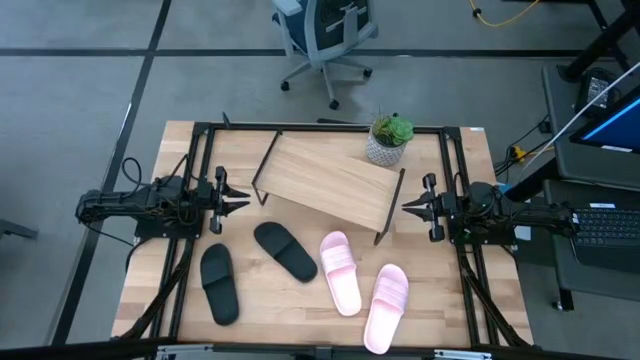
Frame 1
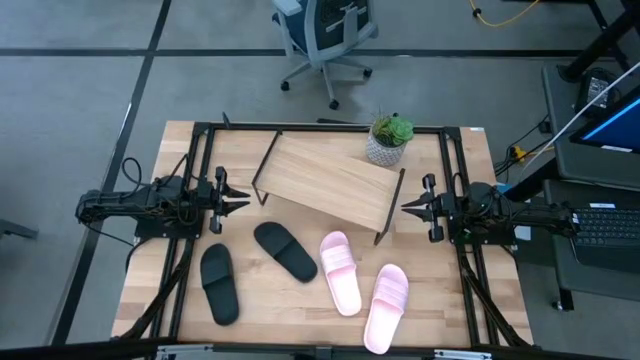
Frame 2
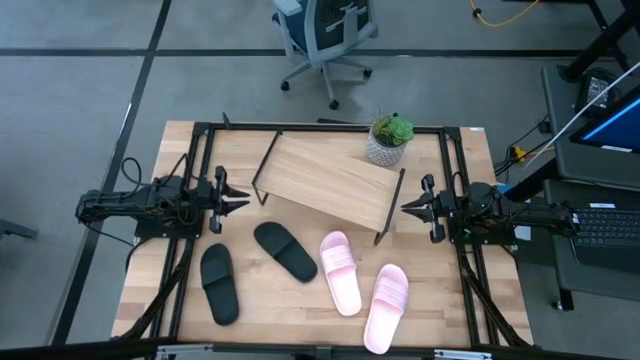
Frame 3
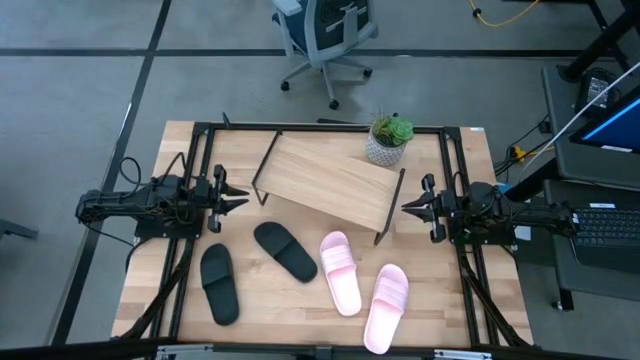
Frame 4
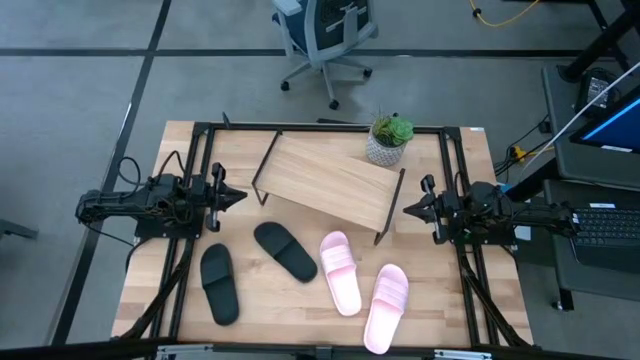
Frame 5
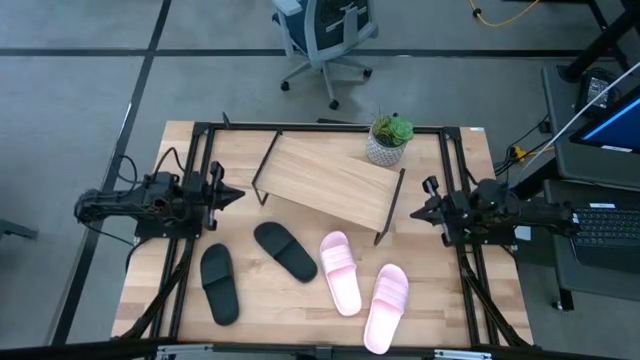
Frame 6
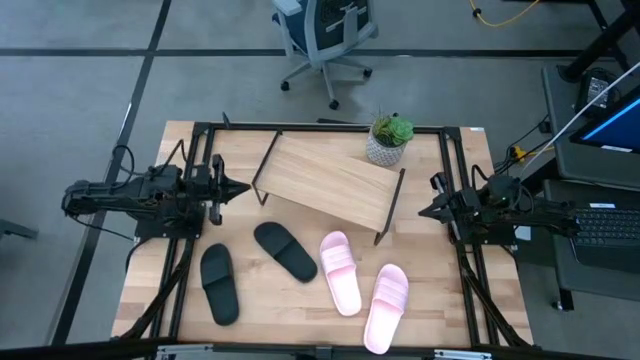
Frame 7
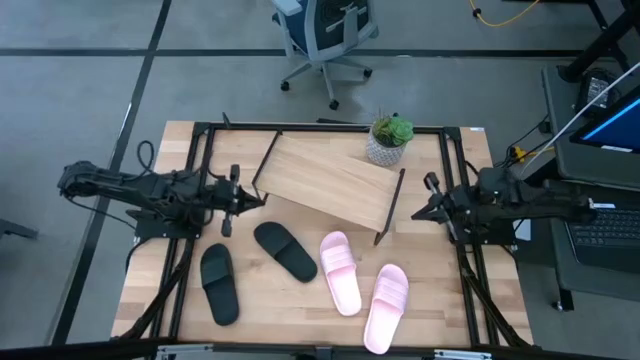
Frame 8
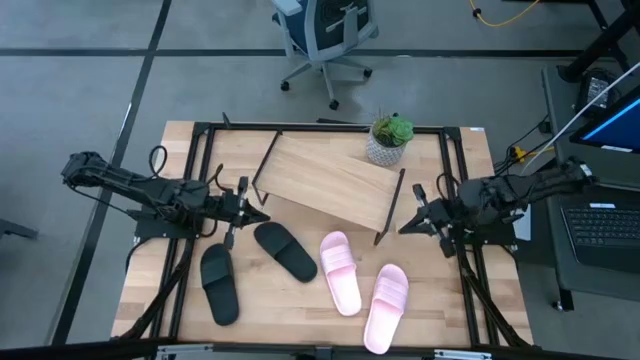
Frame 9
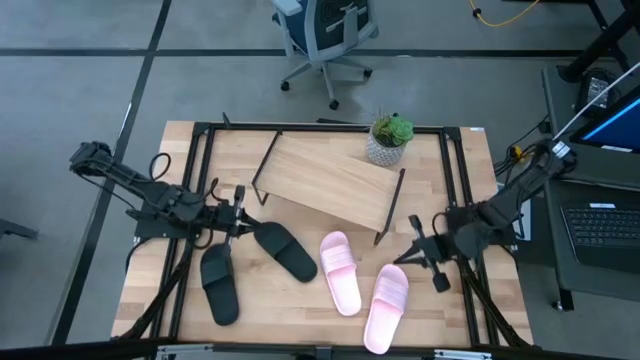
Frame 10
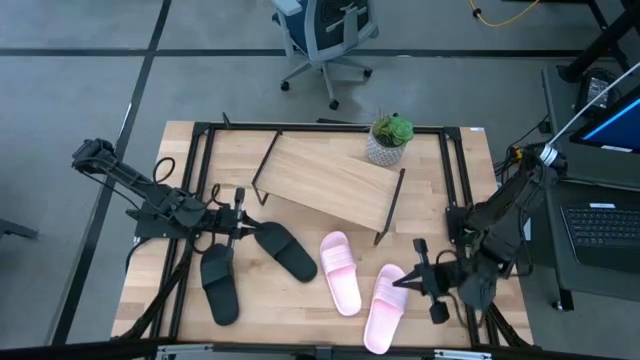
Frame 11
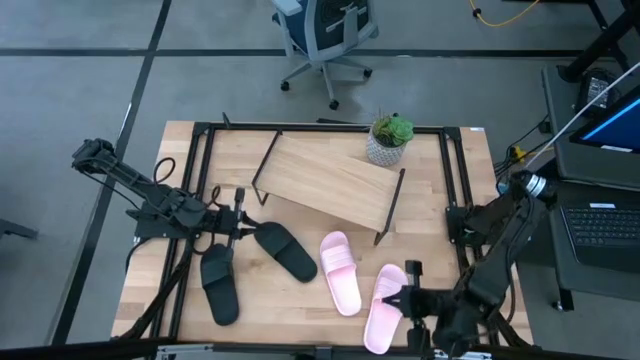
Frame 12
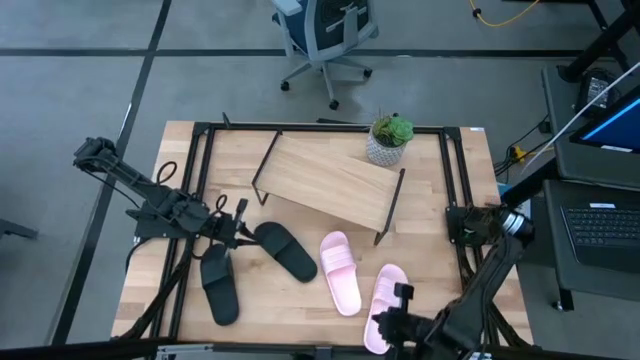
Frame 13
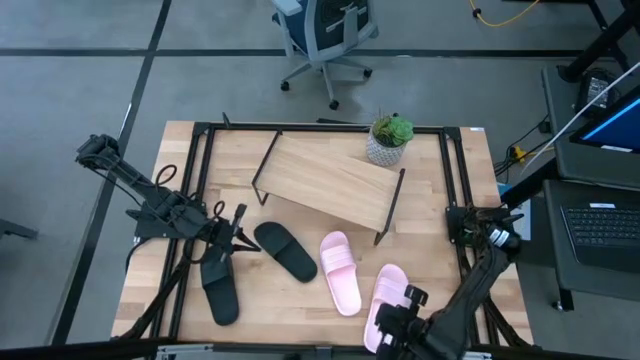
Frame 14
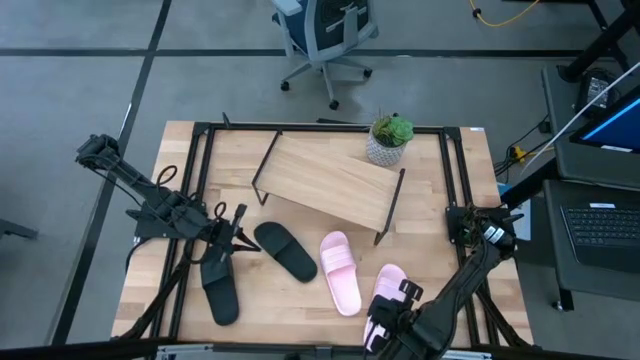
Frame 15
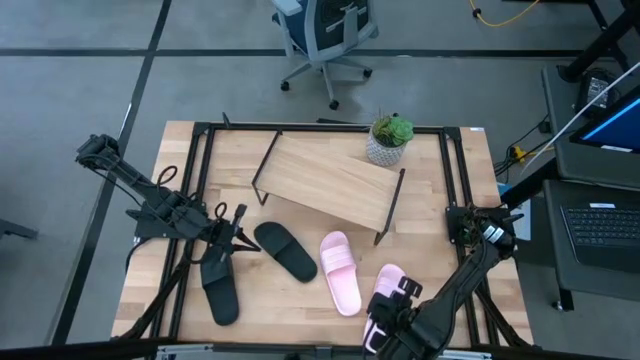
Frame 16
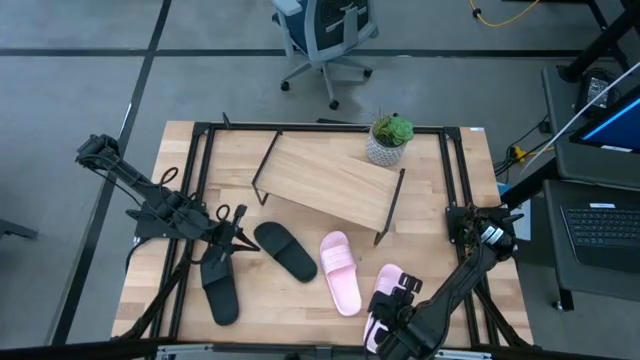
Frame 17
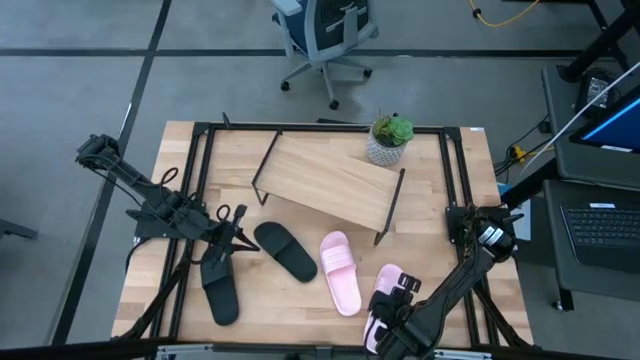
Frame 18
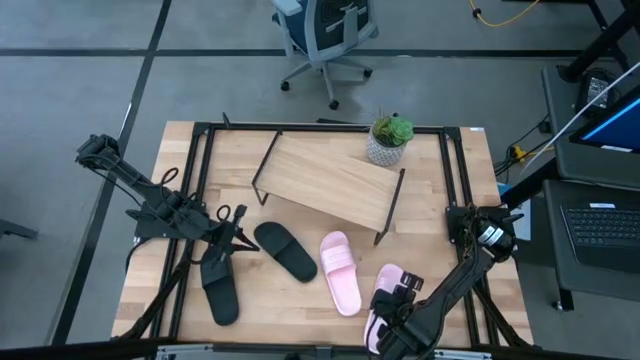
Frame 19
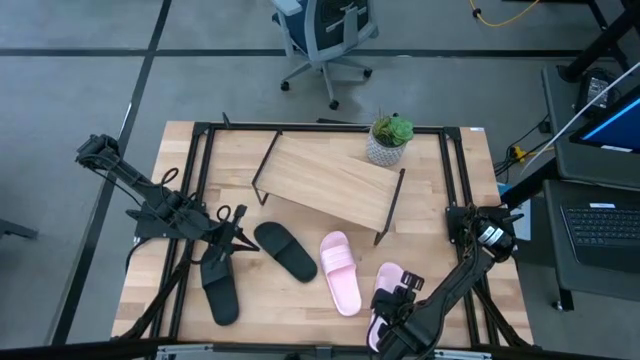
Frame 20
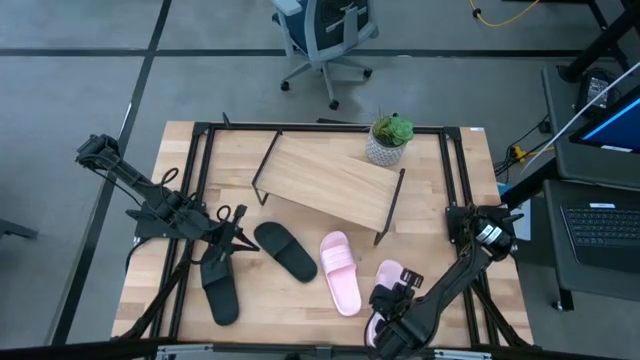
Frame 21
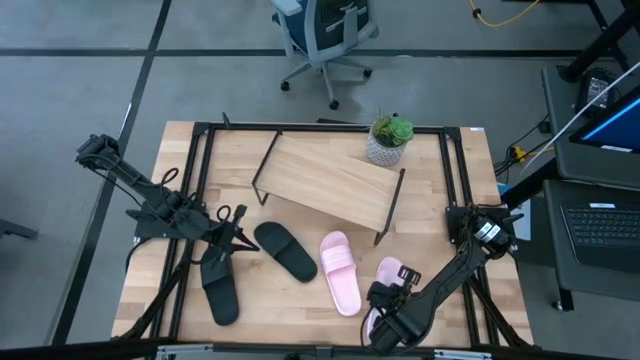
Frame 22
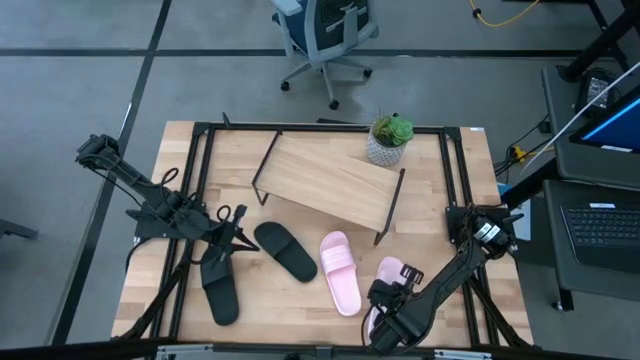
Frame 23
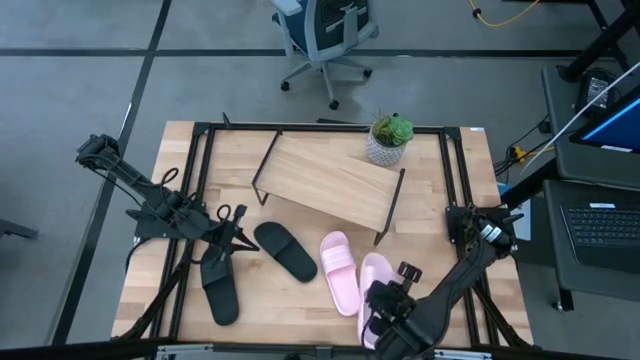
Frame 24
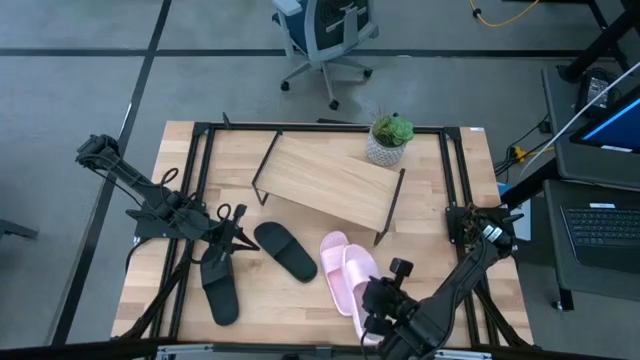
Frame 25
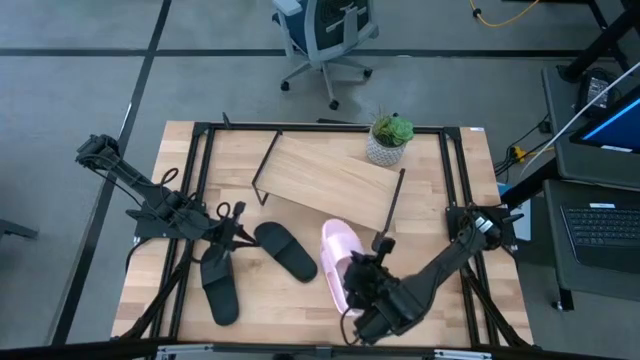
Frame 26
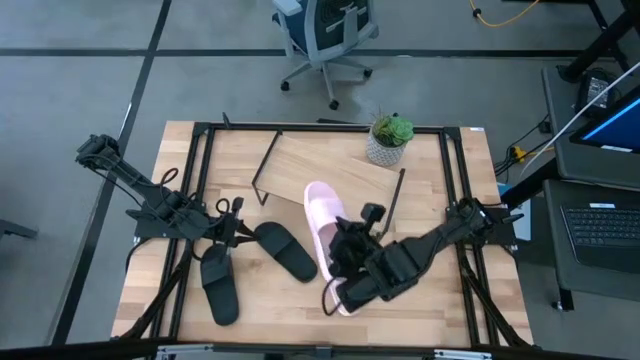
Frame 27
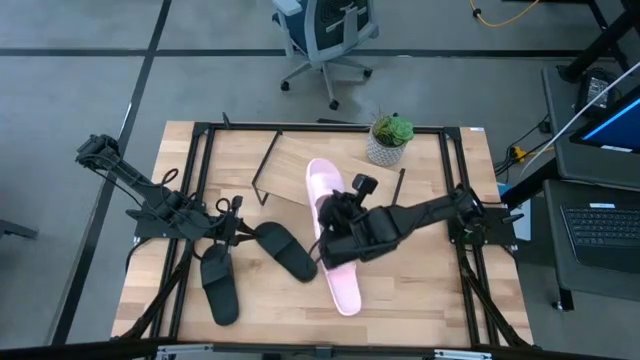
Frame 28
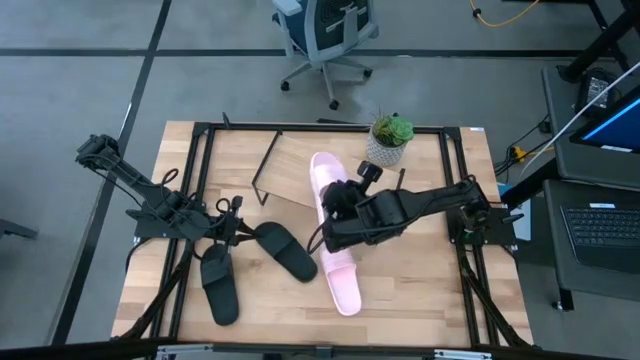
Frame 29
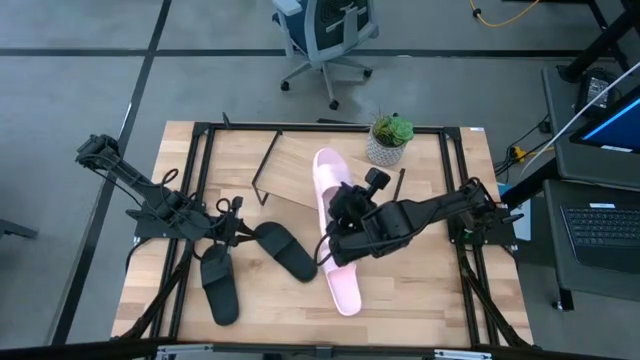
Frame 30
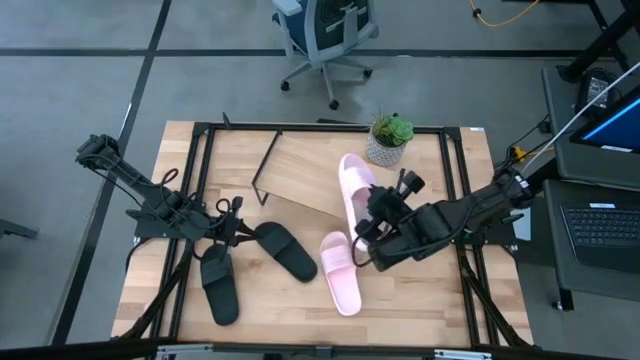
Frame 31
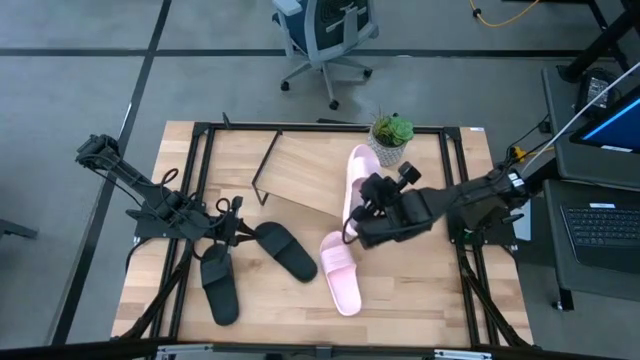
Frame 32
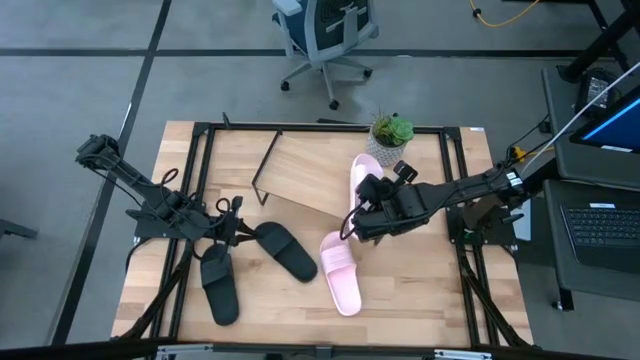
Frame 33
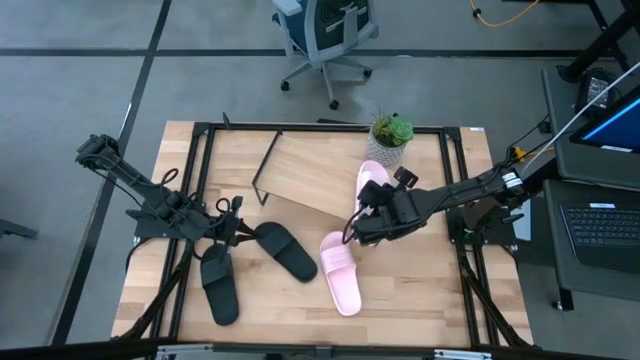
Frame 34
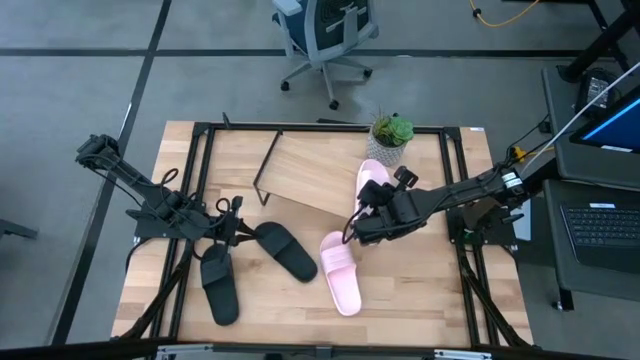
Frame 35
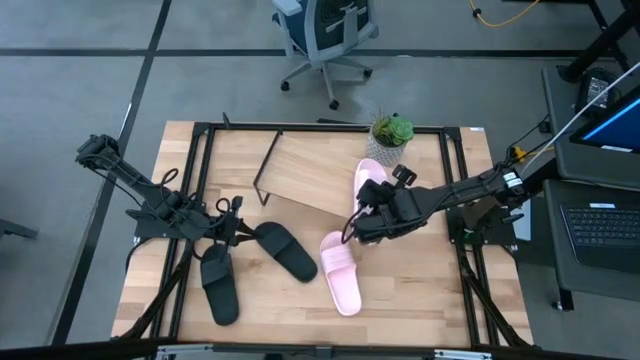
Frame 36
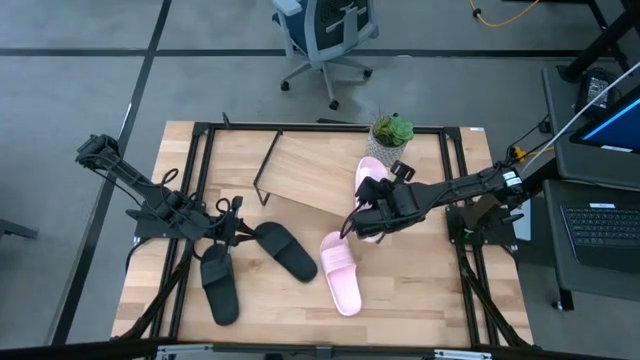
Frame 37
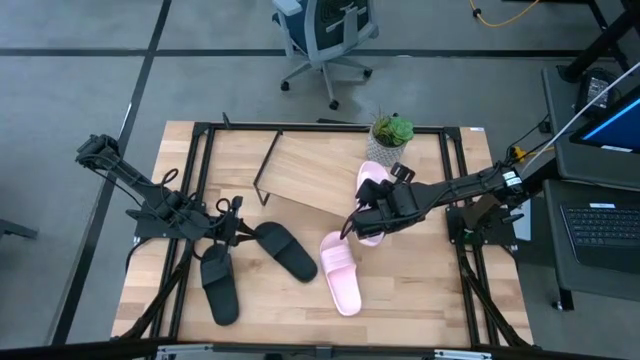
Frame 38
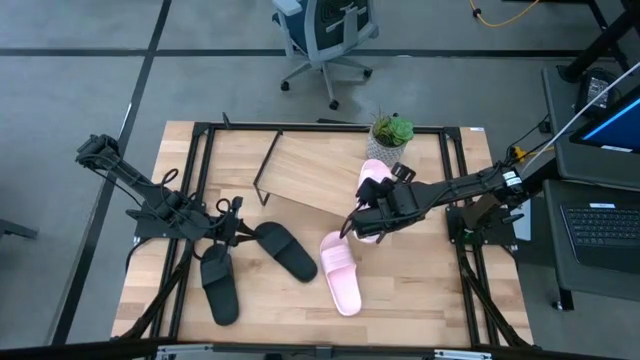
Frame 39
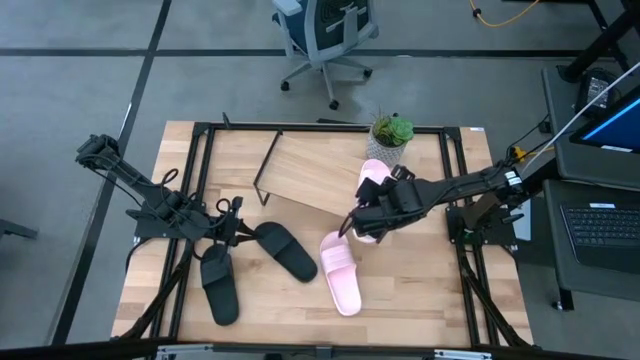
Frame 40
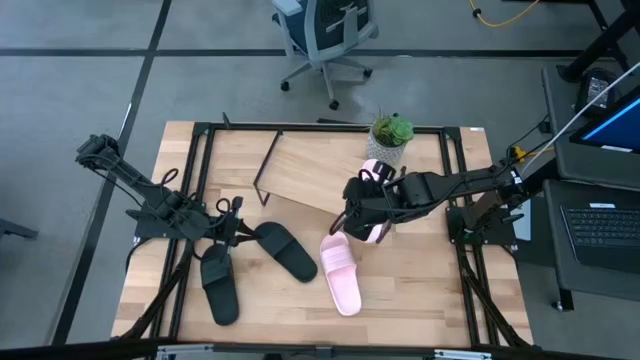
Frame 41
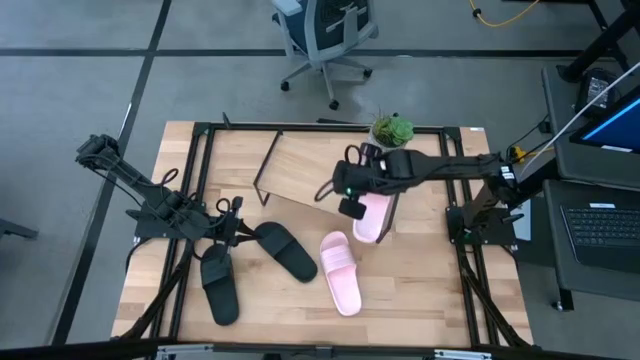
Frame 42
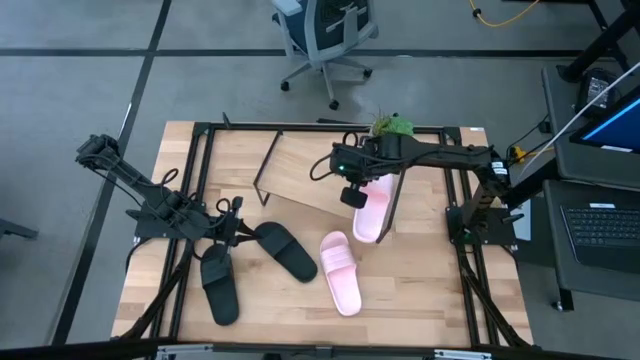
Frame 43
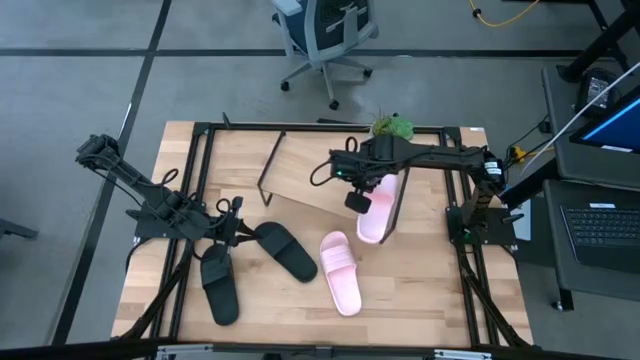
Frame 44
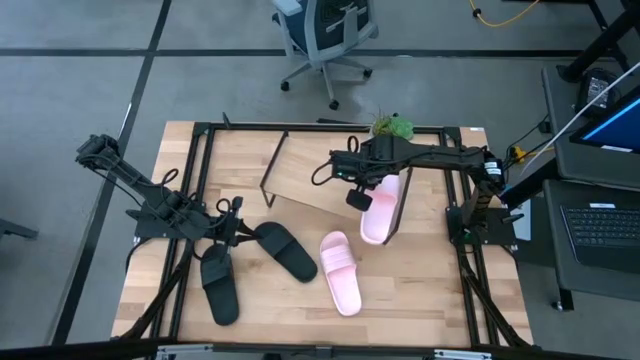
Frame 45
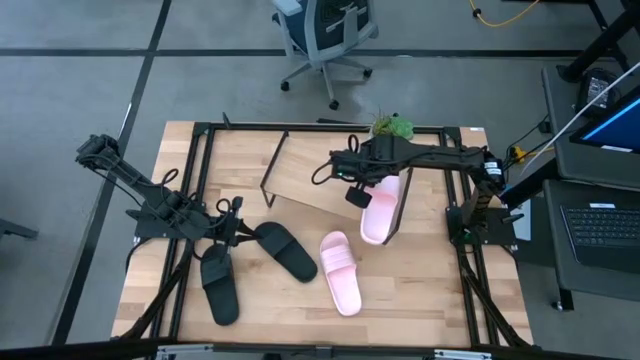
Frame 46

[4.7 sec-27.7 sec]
Task: Pick and place slides into the shelf
Put the right pink slide on the shelf
